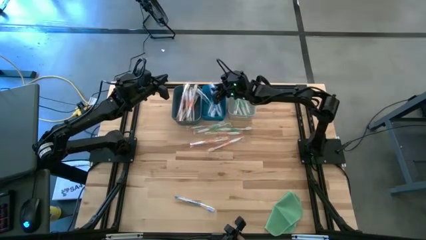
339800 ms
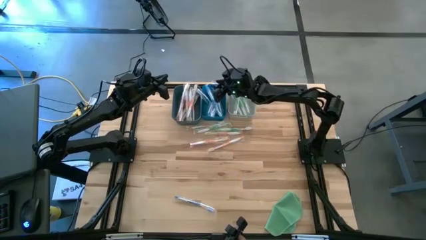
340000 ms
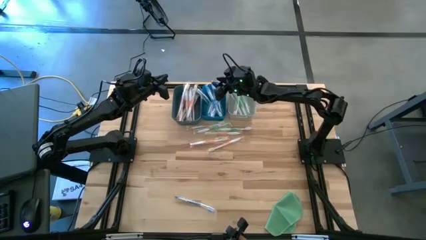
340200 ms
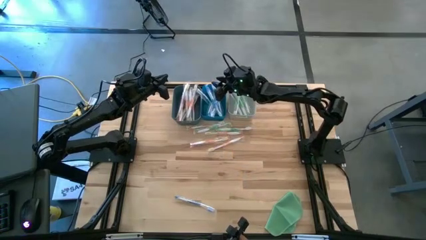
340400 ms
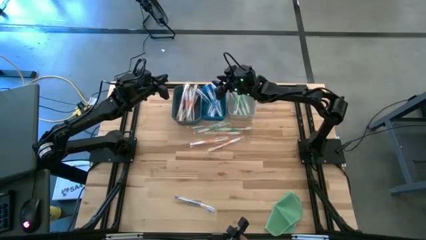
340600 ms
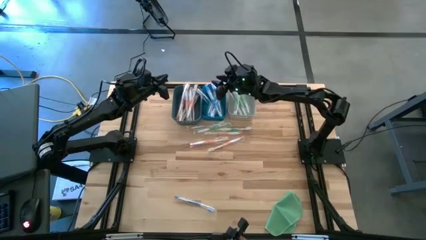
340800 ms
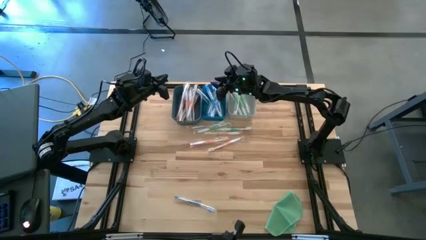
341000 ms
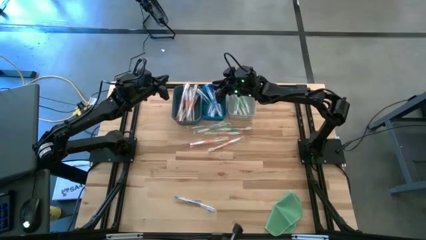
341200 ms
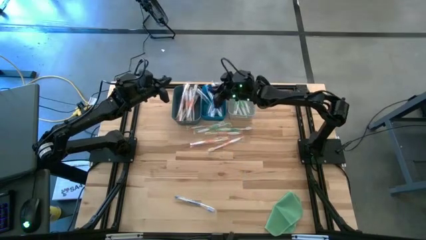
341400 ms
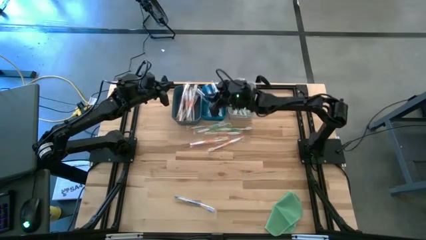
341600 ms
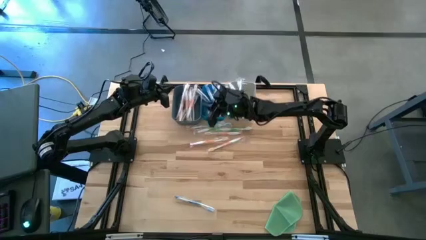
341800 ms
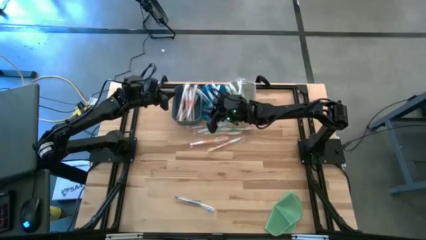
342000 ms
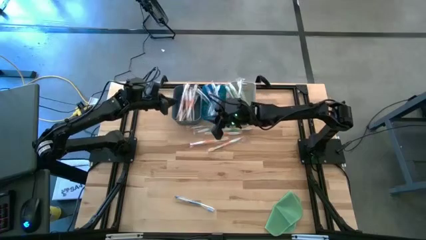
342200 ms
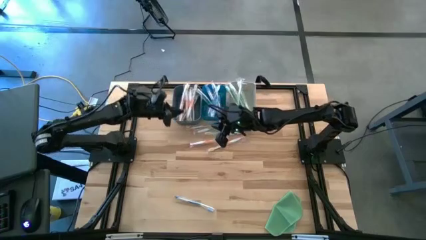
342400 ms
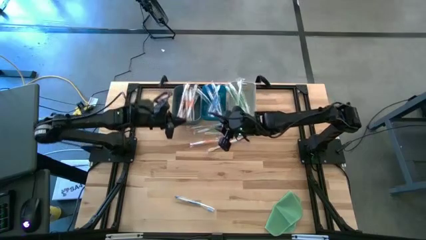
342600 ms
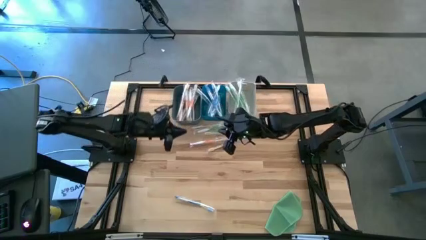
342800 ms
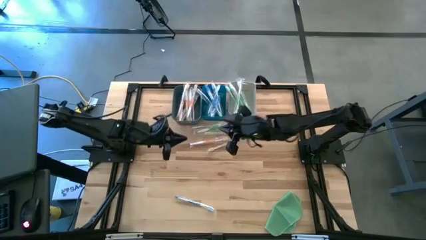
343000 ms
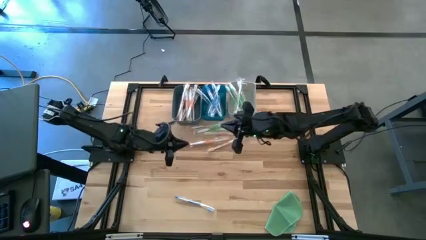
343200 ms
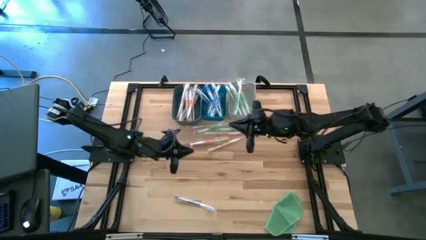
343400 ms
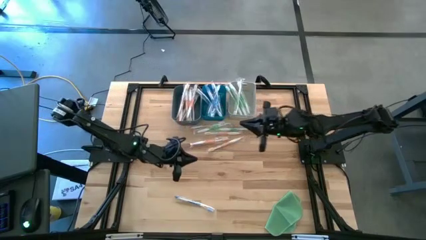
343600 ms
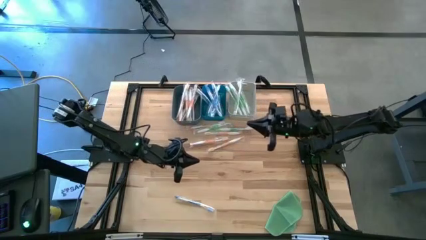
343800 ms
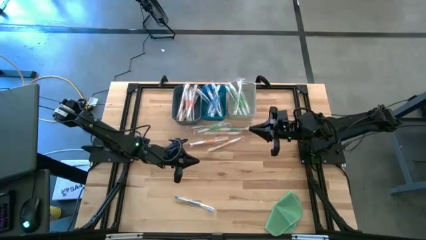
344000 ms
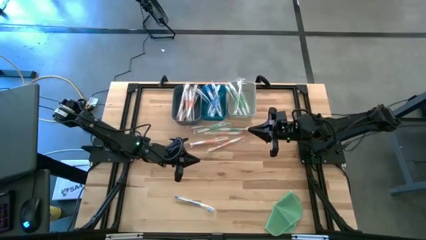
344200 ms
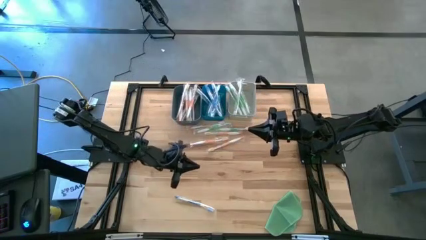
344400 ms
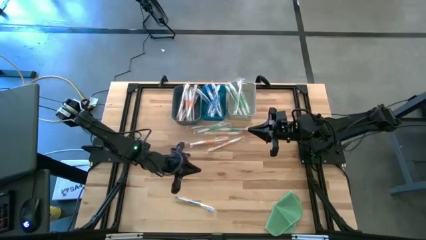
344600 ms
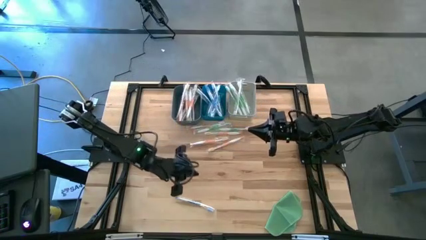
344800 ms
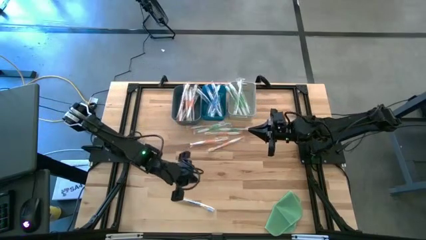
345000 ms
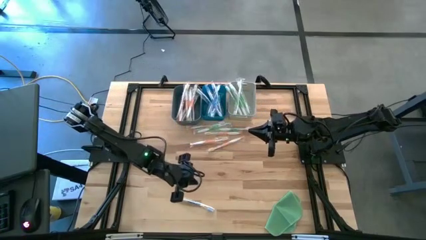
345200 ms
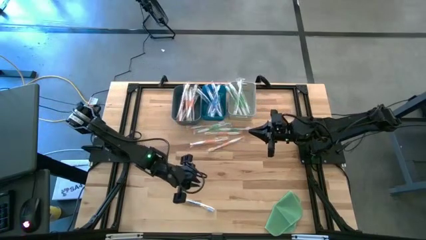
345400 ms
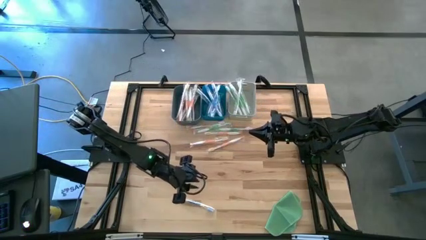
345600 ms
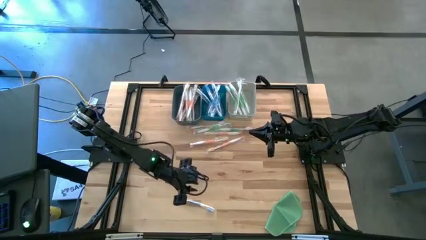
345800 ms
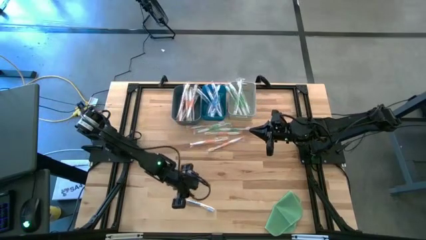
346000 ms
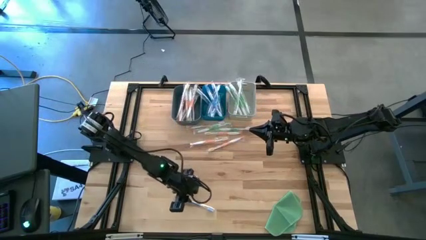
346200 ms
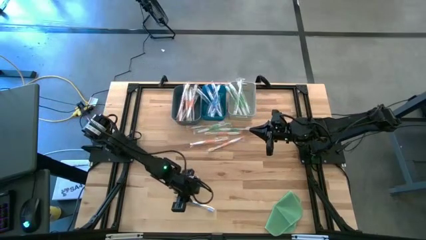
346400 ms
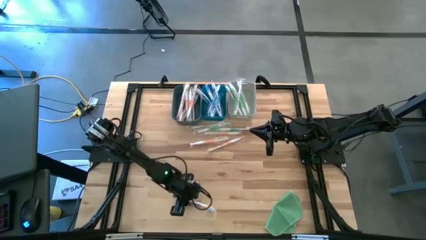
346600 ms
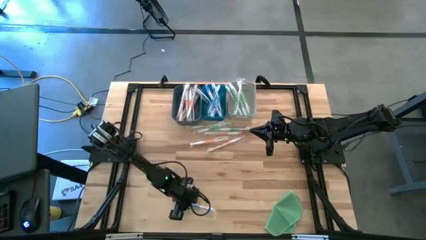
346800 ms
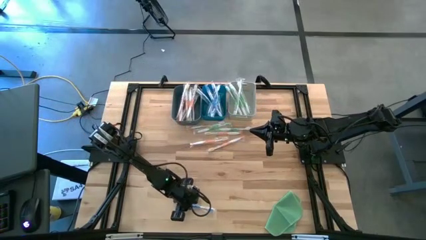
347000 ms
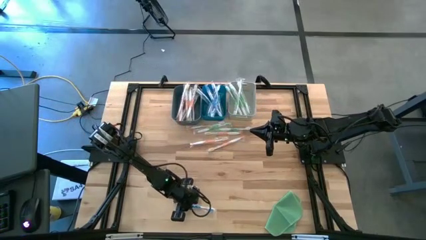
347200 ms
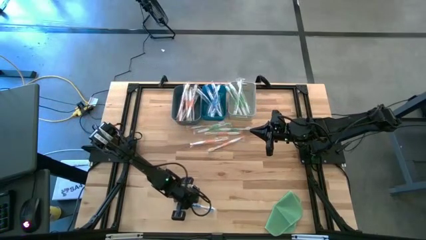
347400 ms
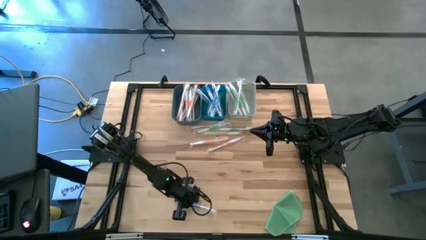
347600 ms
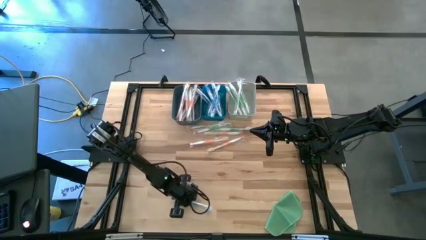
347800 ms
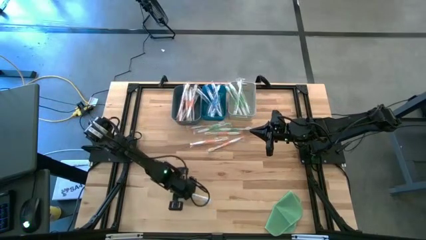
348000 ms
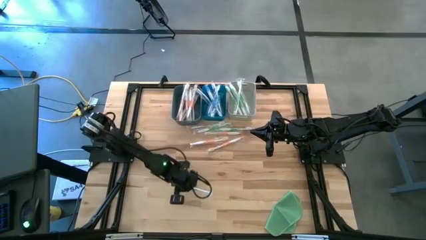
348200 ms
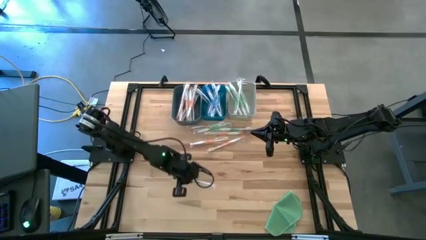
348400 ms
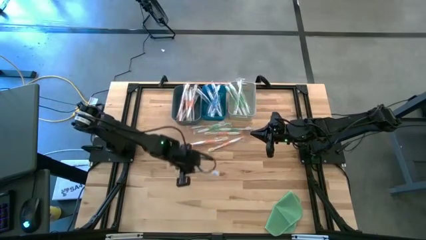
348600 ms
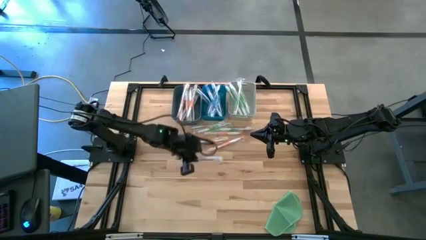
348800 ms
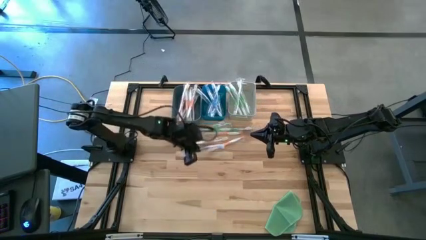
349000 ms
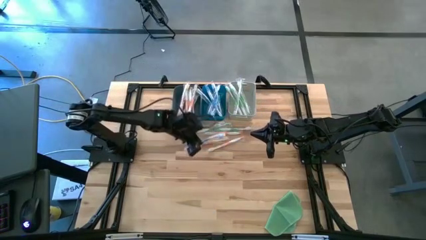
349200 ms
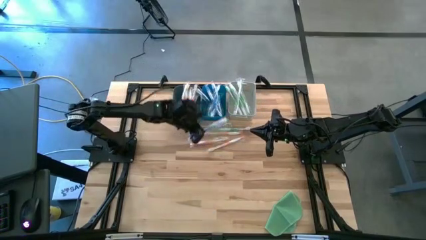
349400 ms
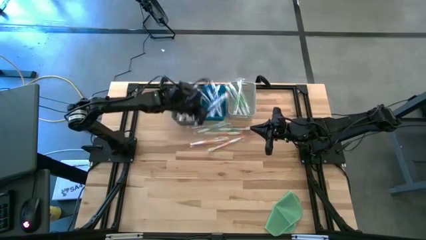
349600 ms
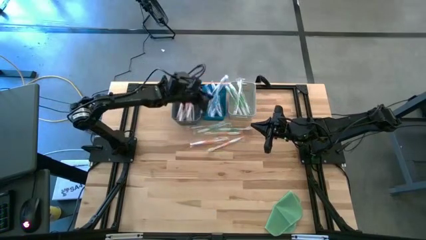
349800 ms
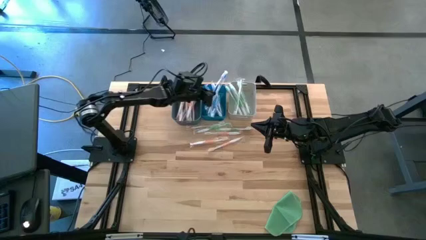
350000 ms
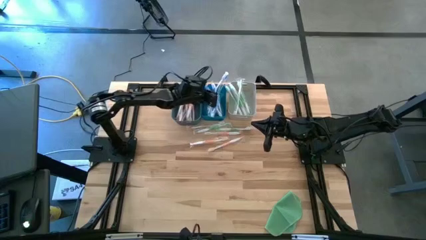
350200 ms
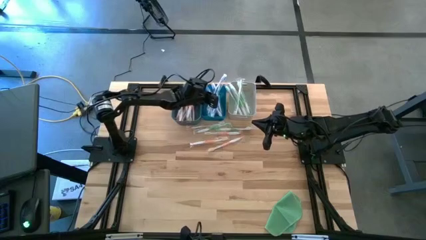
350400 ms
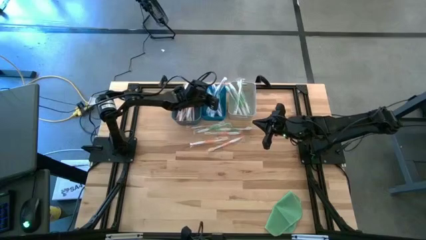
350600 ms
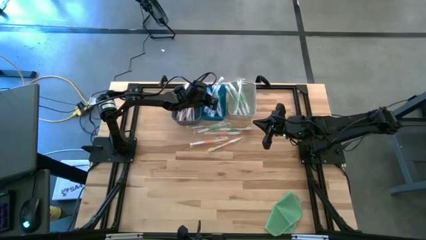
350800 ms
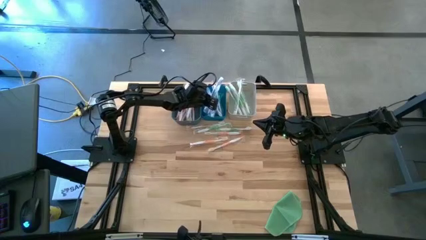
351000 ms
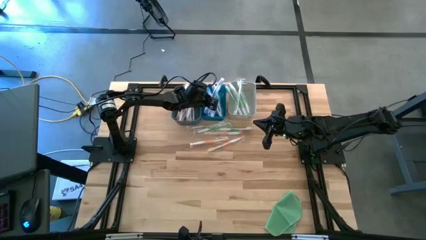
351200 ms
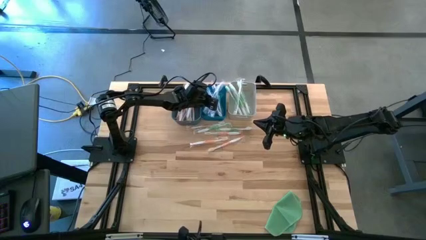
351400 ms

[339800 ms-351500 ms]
Task: Pick & Place Toothbrushes
Put the blue toothbrush into the blue bin

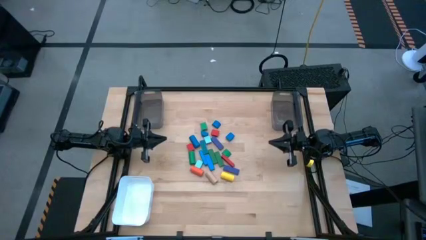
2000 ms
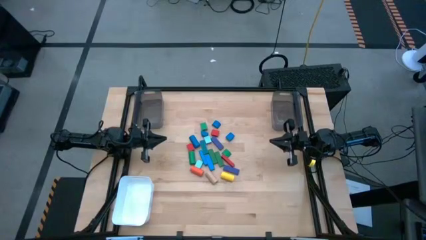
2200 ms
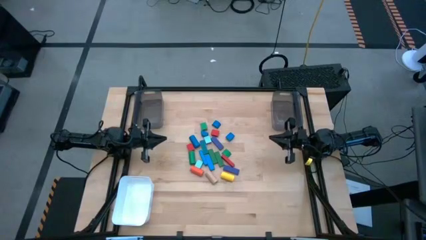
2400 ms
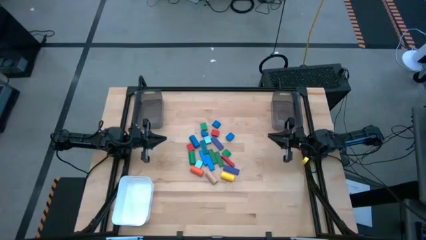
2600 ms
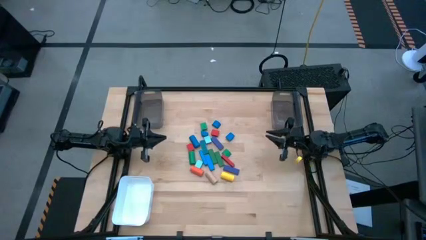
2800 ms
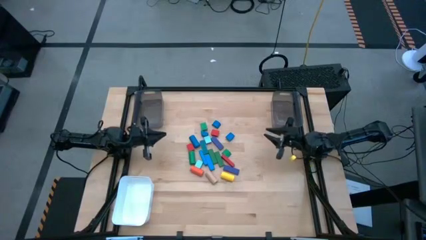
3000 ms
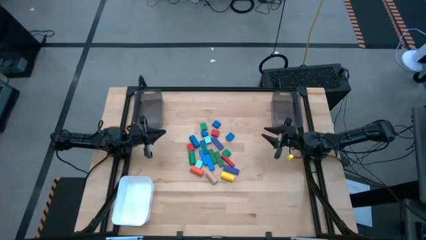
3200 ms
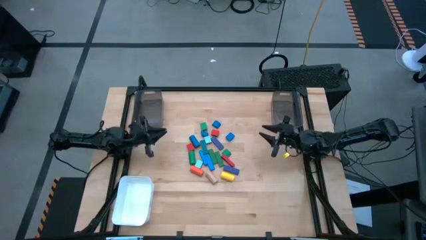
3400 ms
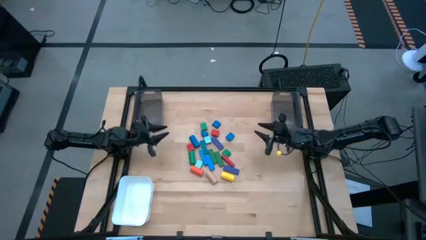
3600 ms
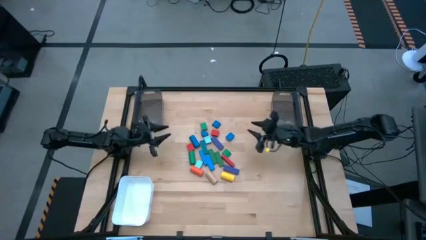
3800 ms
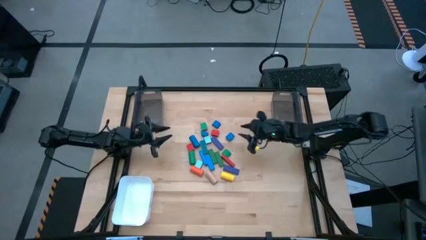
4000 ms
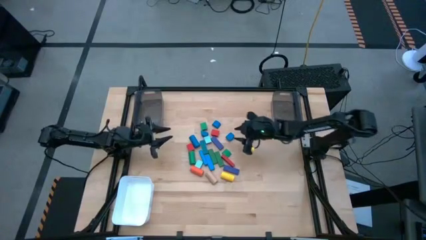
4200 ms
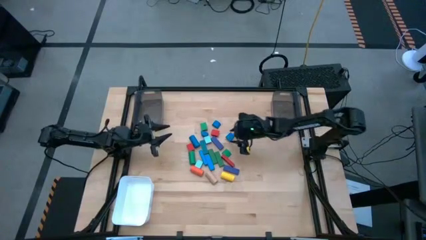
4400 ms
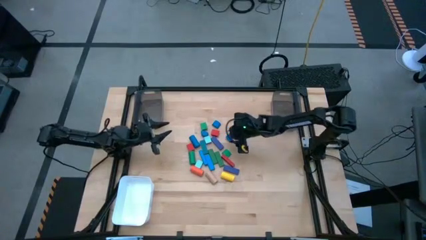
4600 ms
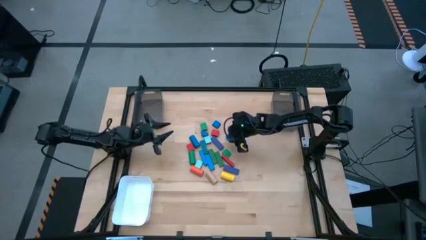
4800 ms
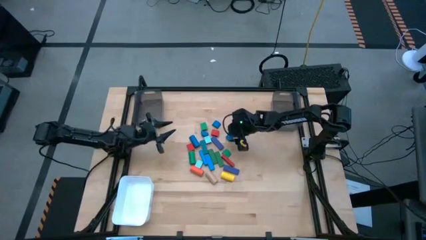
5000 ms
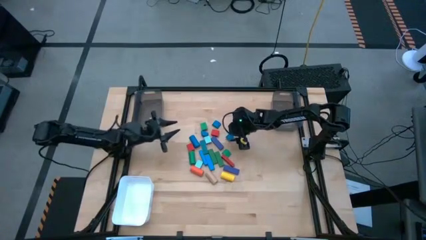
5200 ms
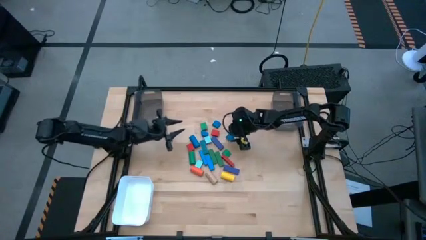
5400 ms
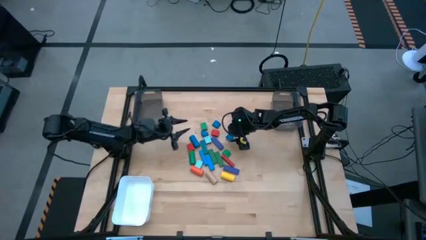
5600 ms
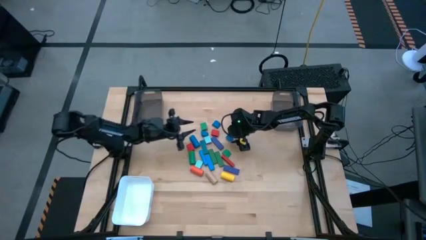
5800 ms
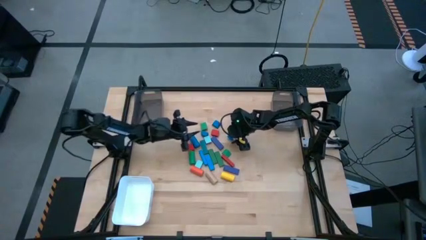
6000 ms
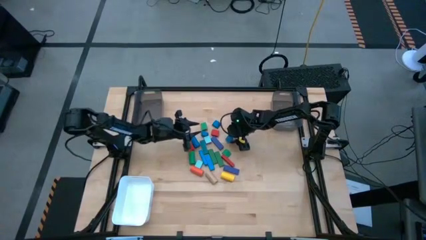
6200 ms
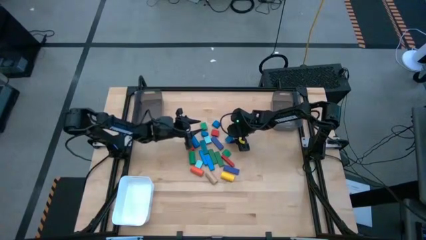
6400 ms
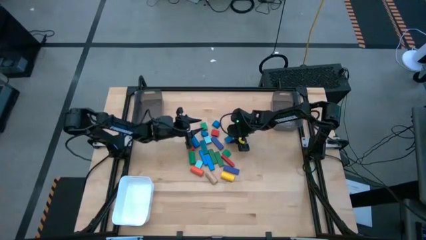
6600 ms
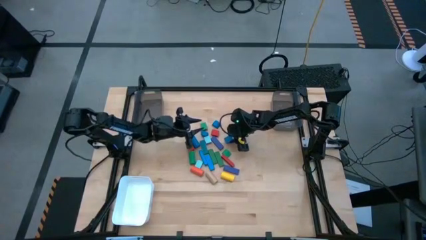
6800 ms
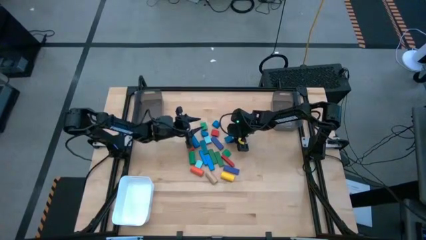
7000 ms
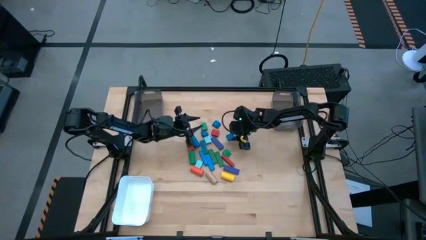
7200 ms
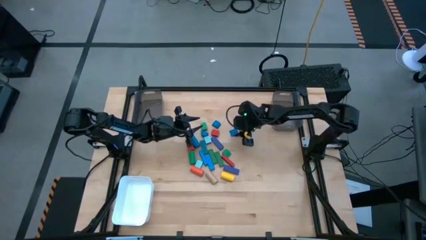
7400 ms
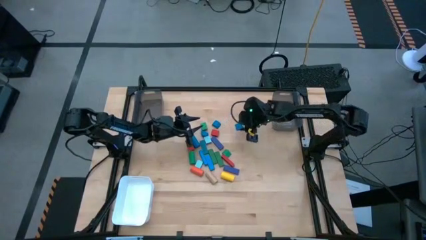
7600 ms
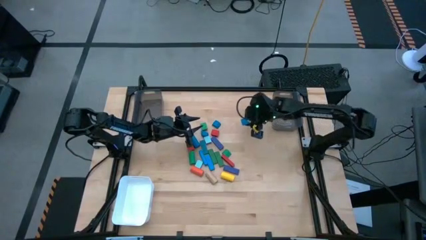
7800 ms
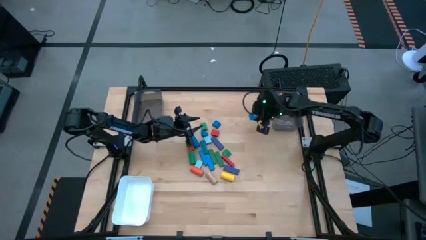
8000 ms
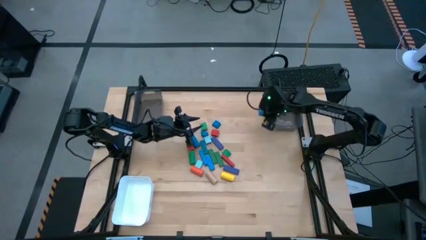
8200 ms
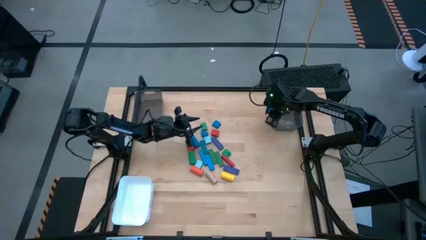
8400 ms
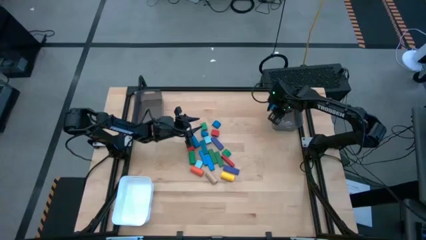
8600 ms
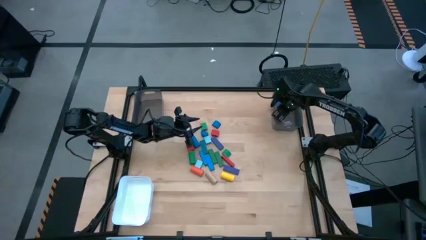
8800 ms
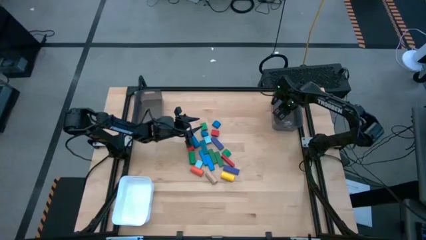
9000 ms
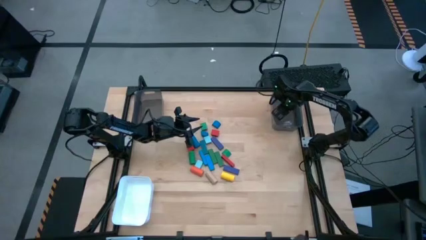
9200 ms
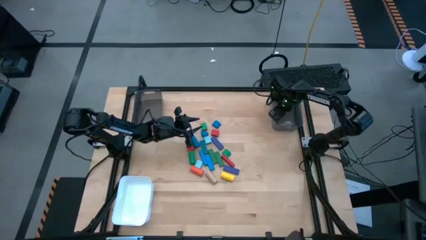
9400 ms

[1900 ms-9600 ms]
Task: Sort blocks by size
Put the blue half circle block into the right black bin
